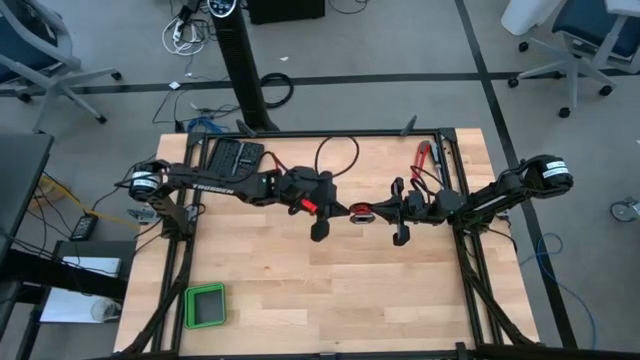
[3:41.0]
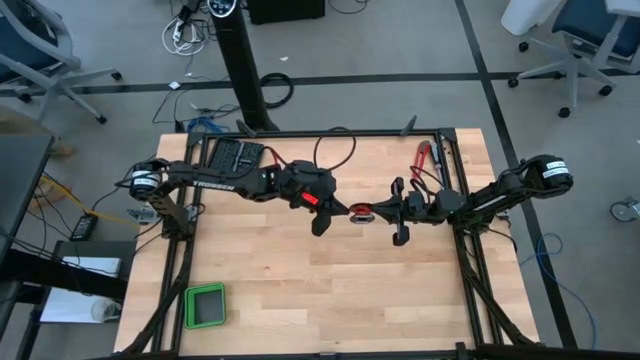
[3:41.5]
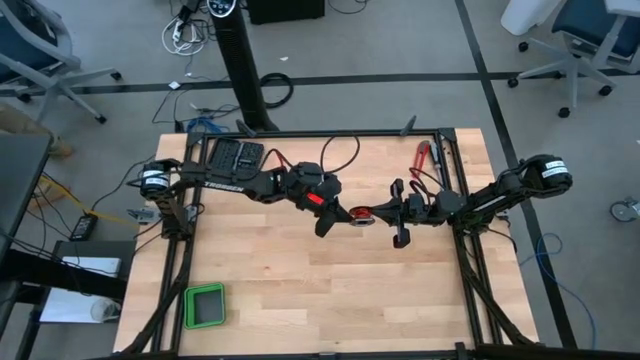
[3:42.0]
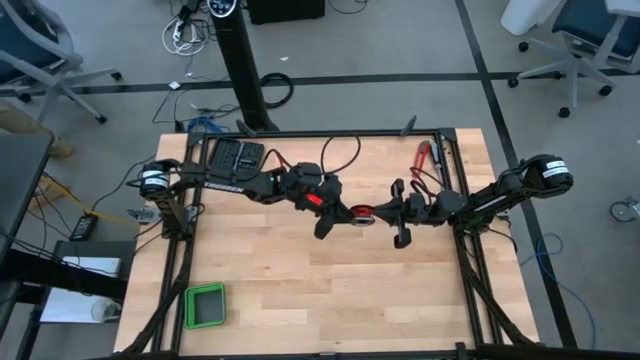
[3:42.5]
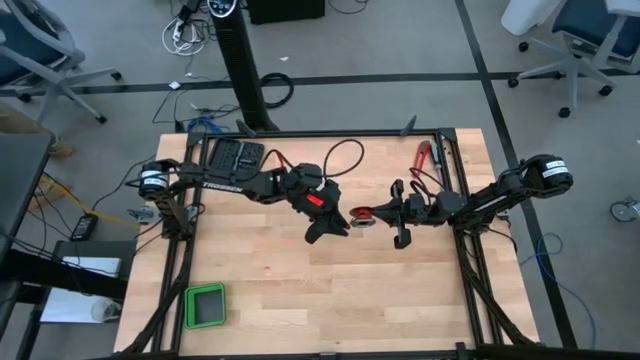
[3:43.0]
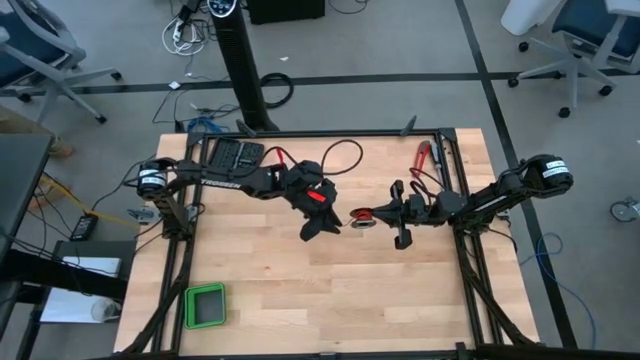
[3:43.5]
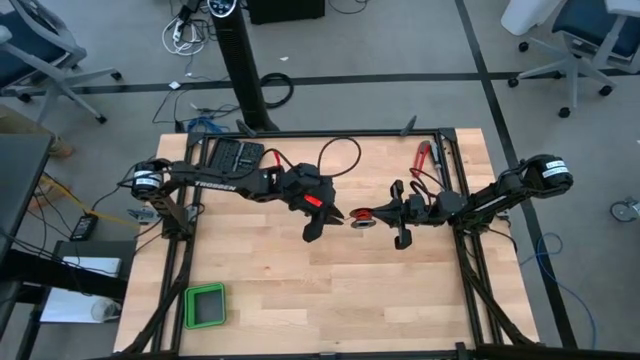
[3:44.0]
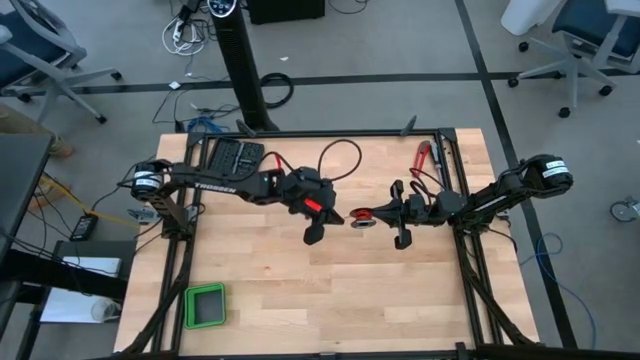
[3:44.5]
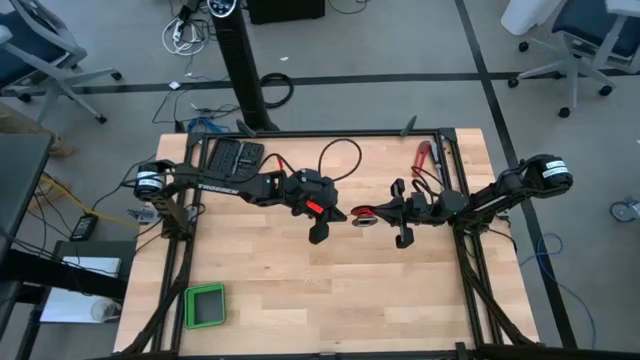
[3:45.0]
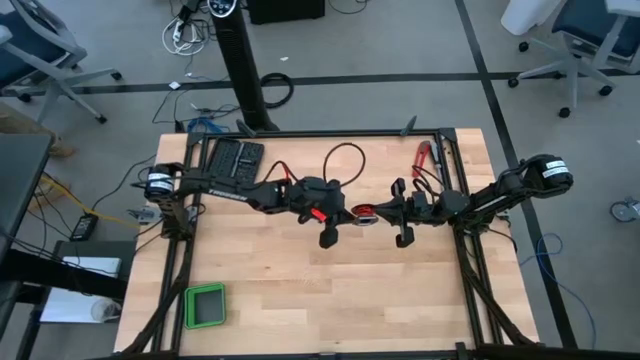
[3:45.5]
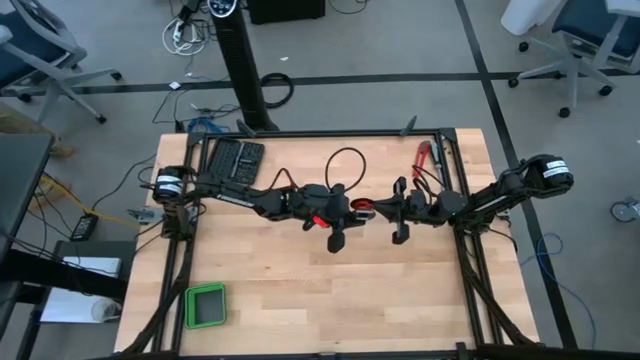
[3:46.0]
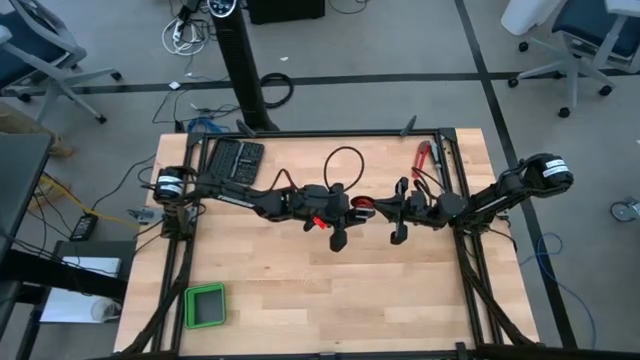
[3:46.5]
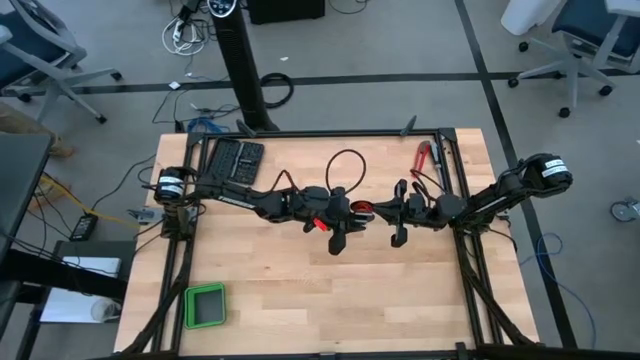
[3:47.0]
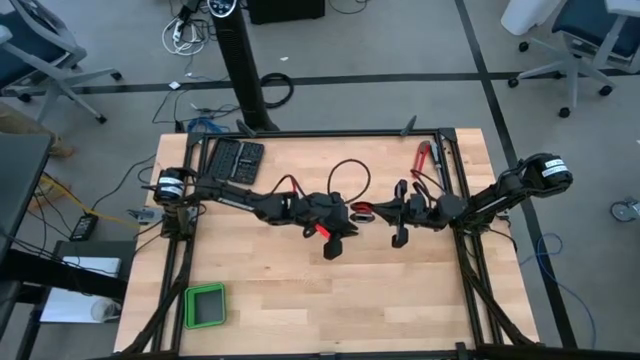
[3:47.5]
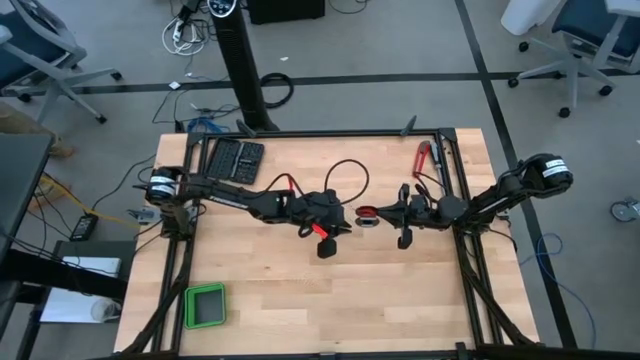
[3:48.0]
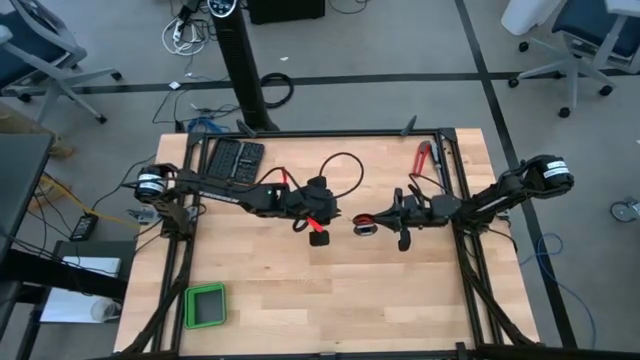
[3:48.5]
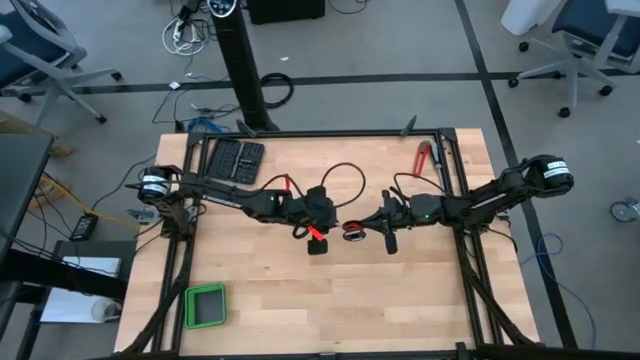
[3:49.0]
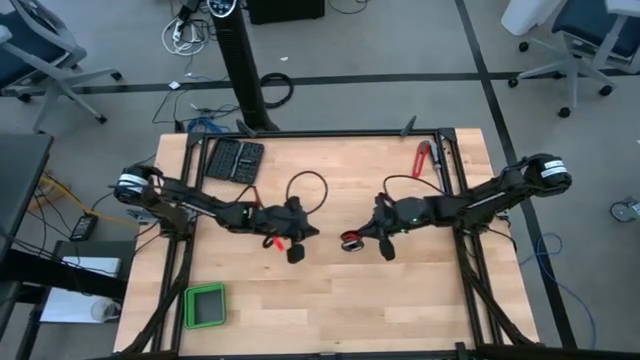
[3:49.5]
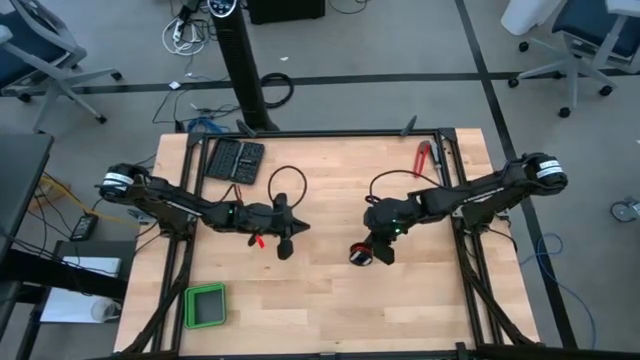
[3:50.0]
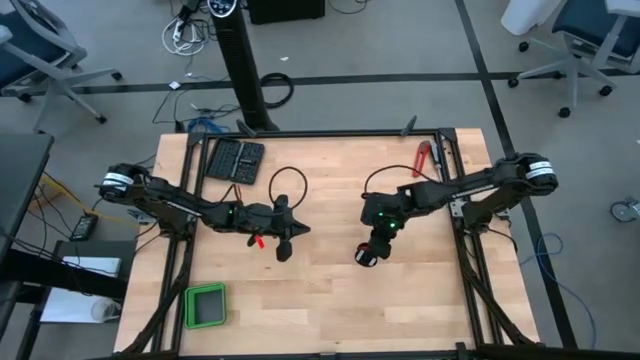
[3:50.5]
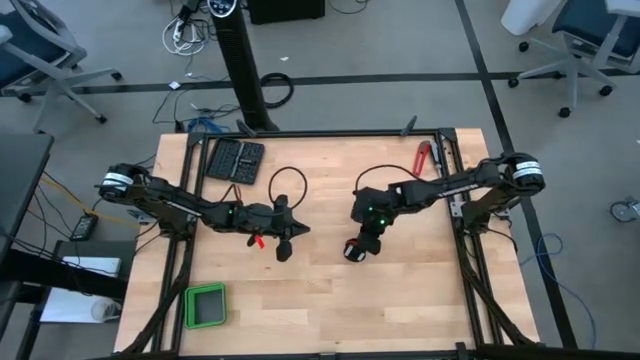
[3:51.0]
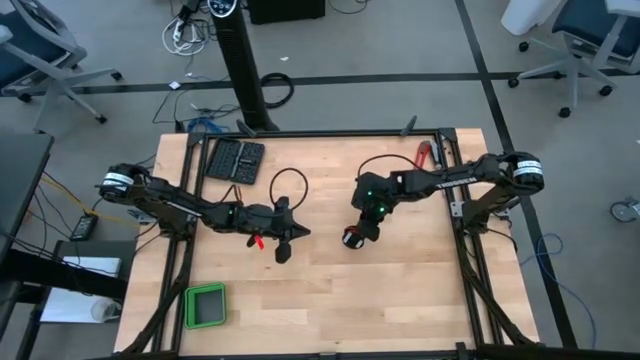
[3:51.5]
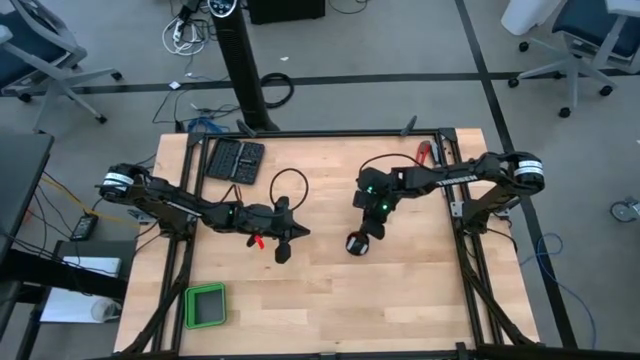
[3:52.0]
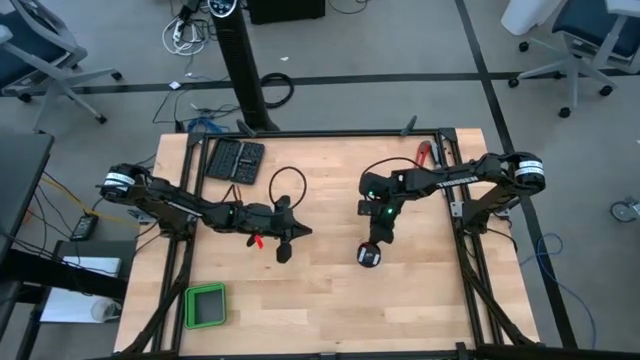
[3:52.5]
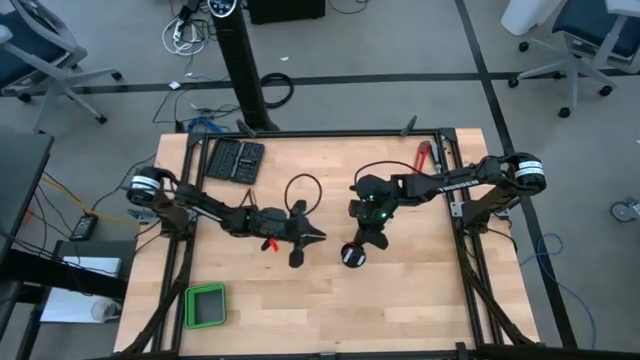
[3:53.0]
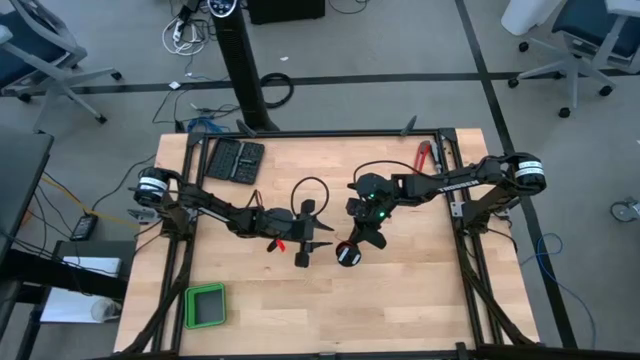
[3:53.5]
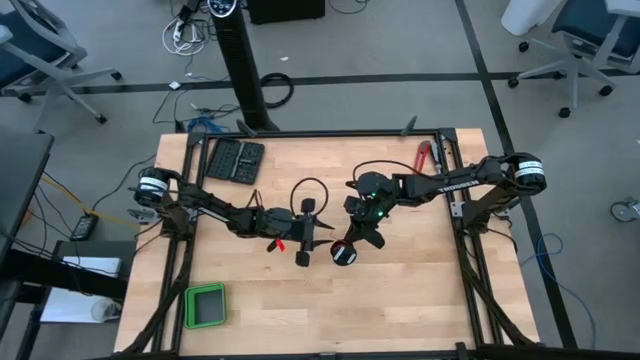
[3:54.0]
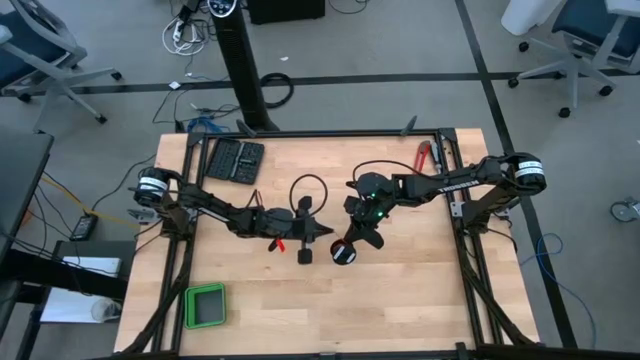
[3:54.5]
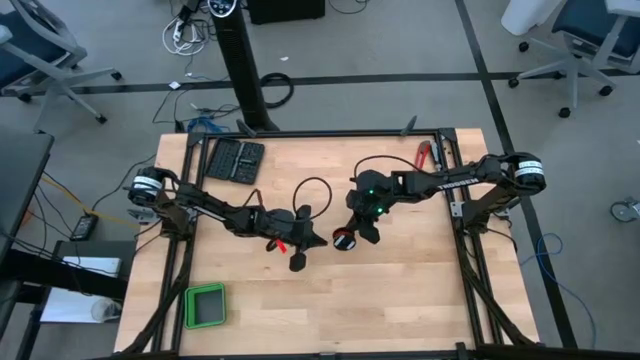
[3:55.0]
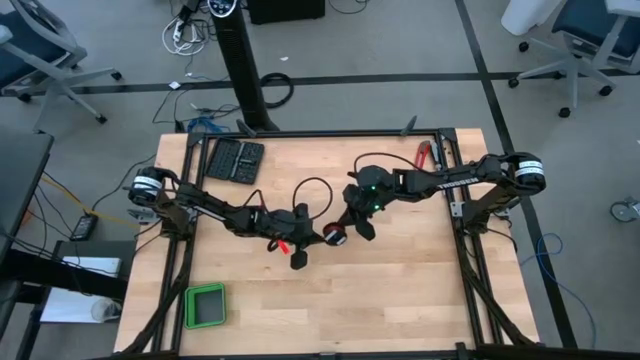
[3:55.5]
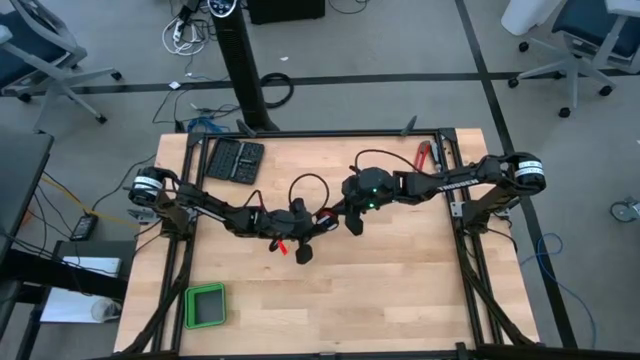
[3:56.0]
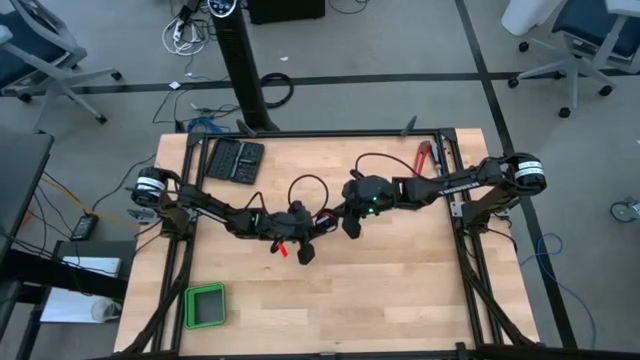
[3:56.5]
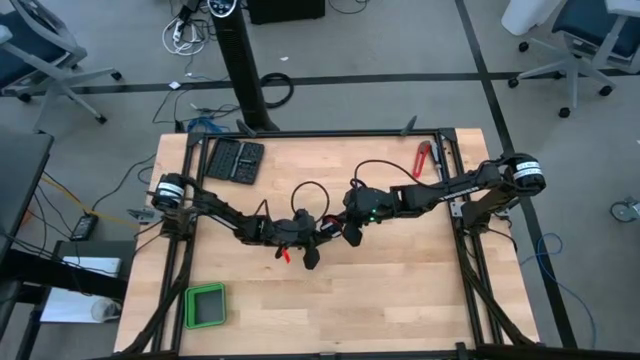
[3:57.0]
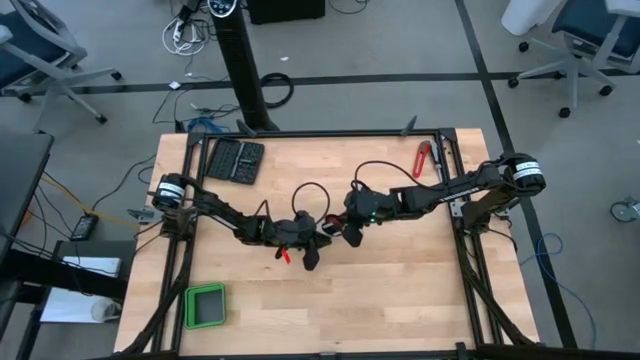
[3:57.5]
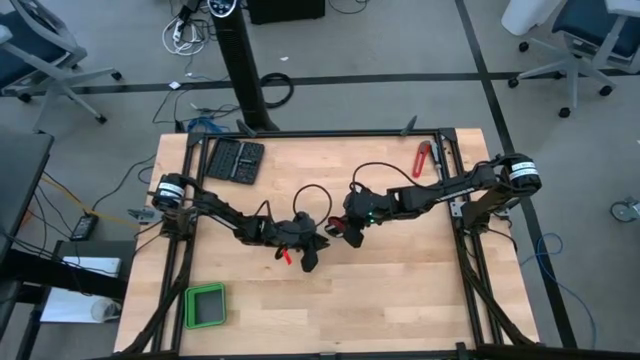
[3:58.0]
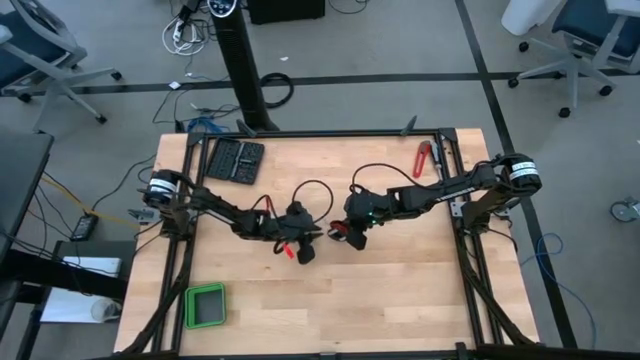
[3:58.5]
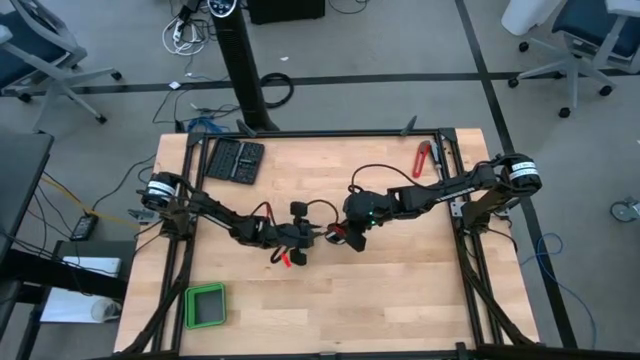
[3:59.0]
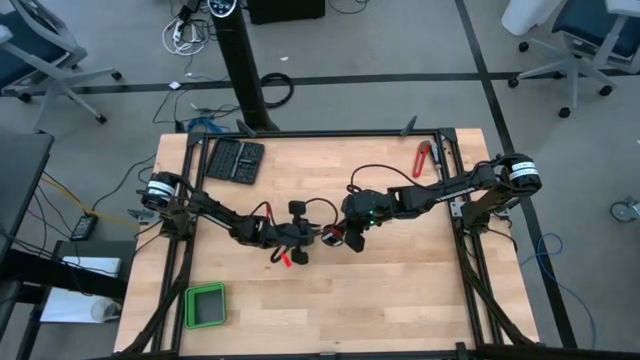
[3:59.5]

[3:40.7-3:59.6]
Task: Coil cords
Coil the red wire onto the black spool

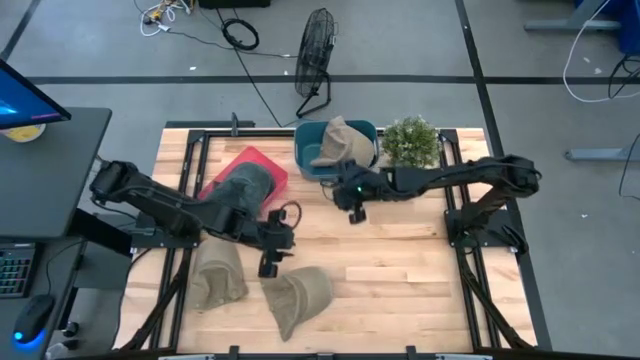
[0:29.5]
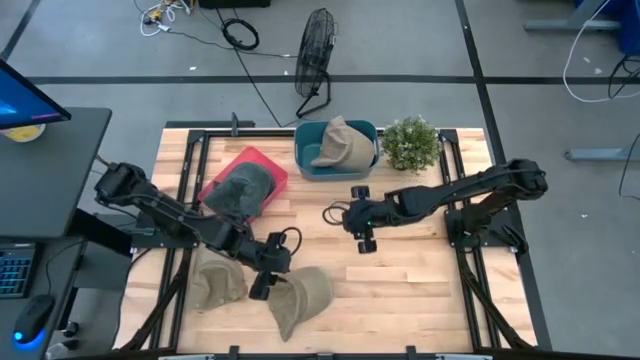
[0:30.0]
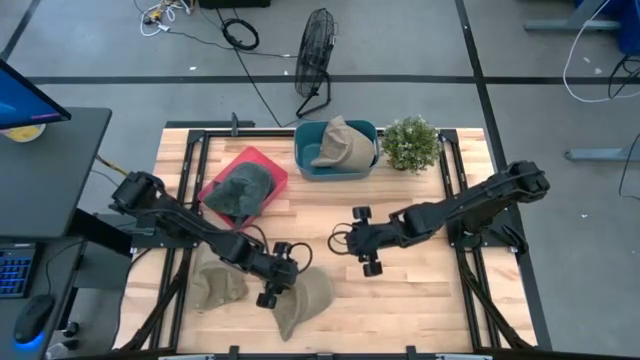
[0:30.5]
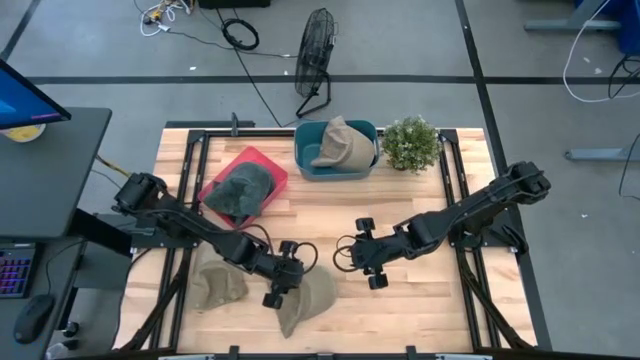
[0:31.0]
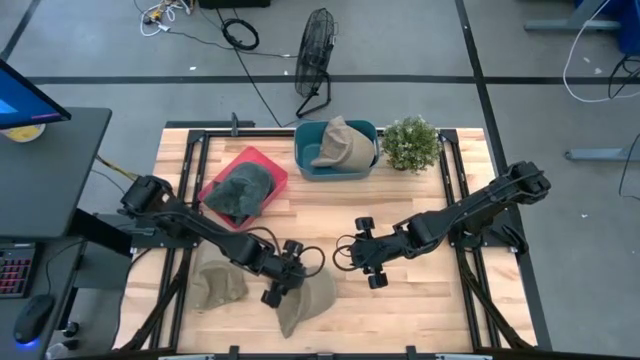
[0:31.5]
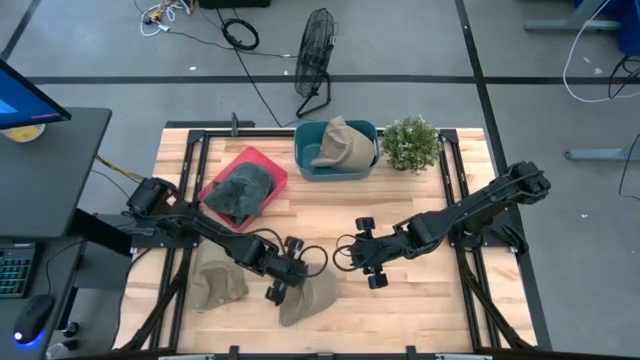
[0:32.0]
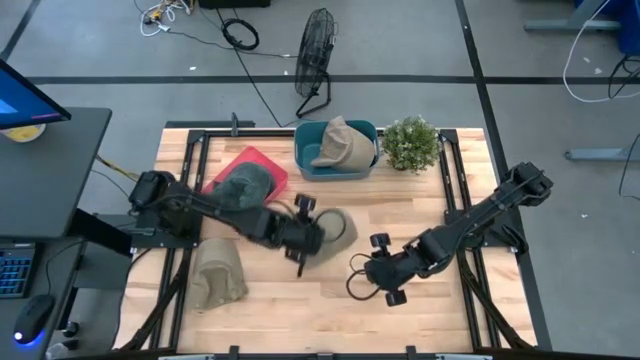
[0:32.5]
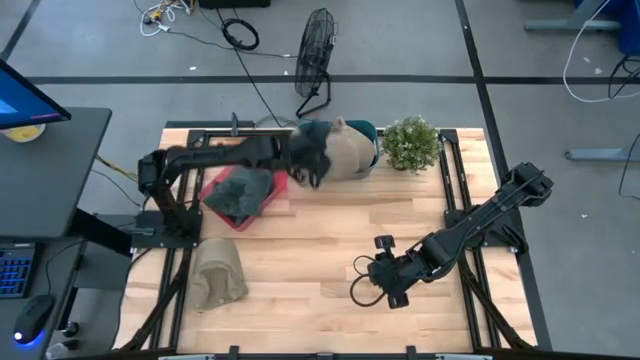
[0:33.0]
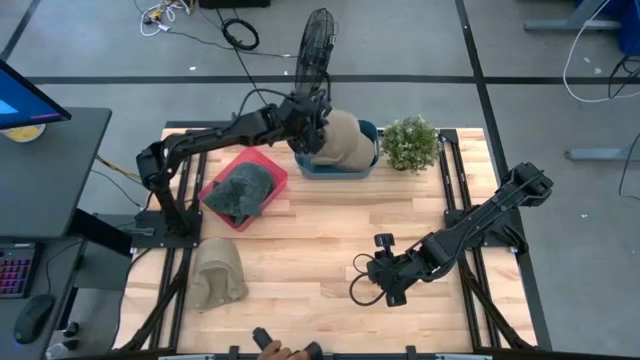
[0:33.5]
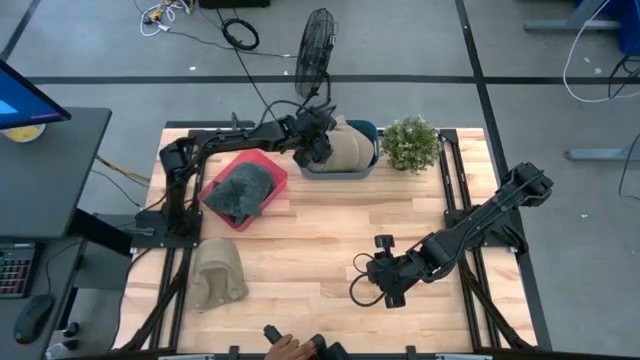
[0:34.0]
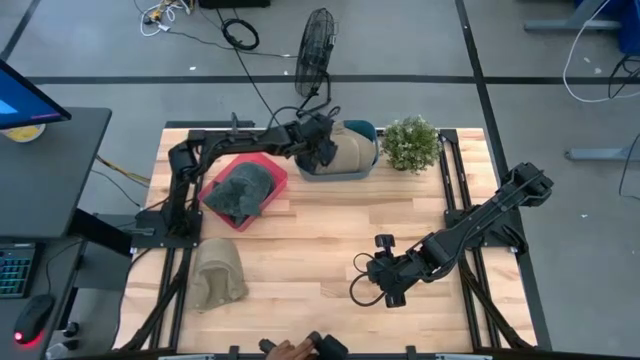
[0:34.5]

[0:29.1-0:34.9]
Task: Pick & Place hat
Put the right brown cap into the blue bin
